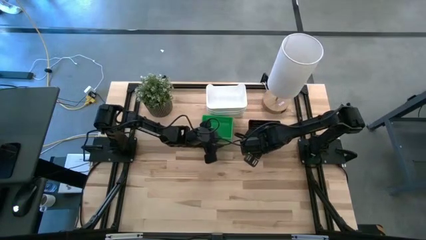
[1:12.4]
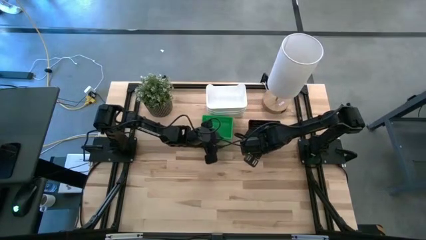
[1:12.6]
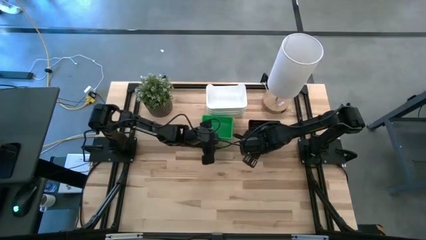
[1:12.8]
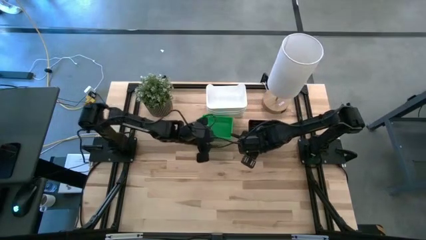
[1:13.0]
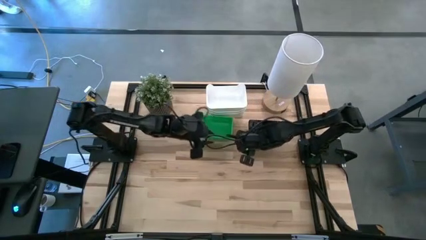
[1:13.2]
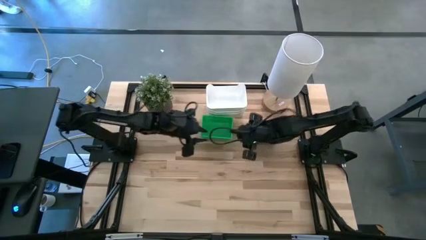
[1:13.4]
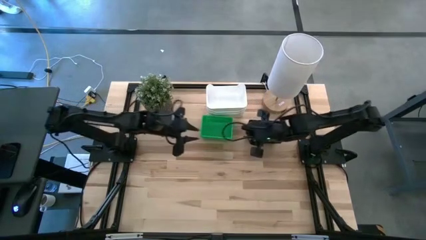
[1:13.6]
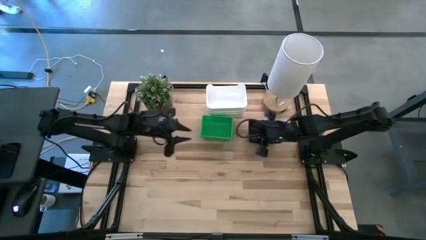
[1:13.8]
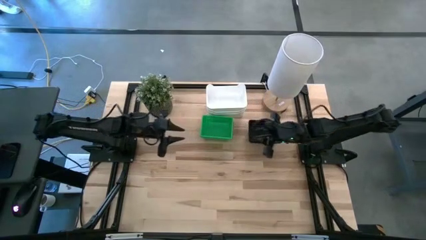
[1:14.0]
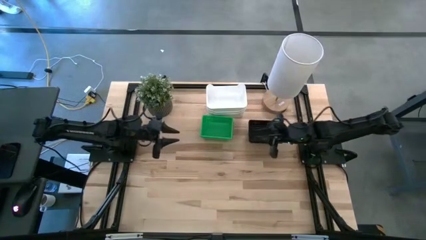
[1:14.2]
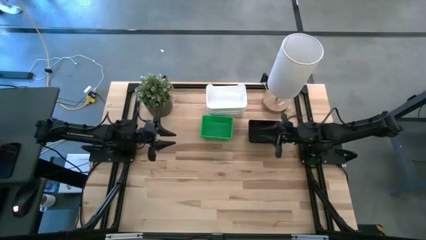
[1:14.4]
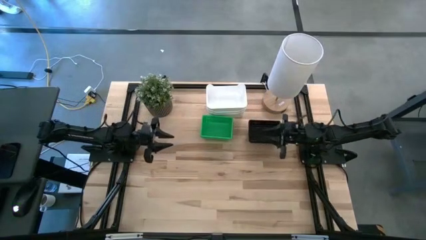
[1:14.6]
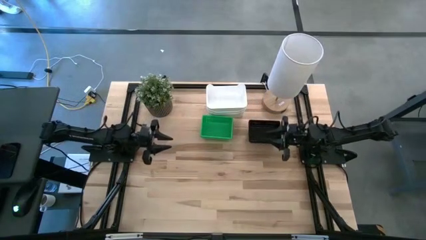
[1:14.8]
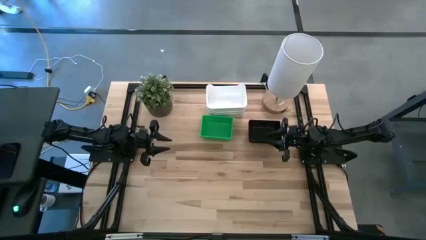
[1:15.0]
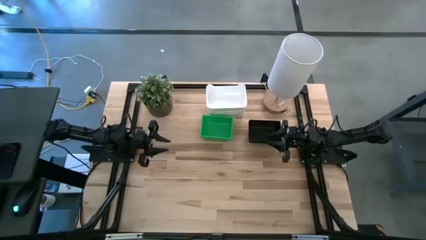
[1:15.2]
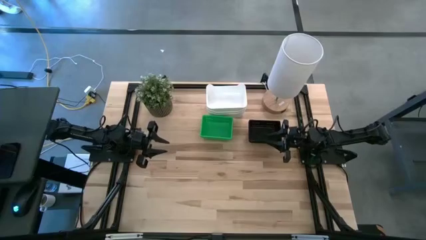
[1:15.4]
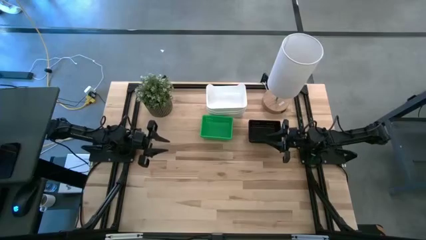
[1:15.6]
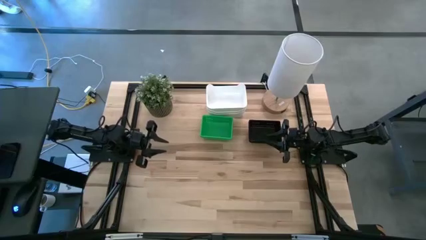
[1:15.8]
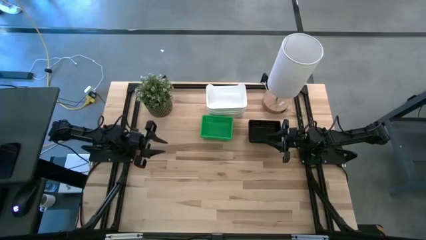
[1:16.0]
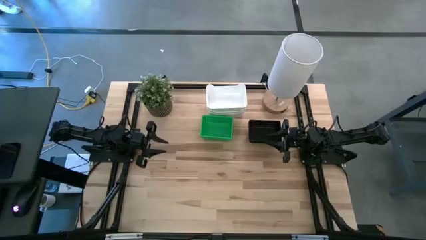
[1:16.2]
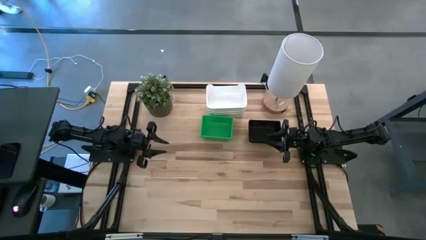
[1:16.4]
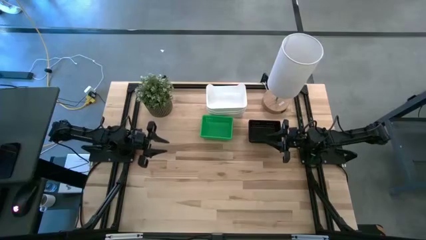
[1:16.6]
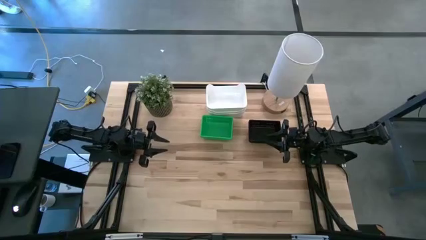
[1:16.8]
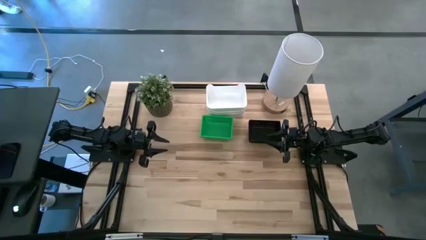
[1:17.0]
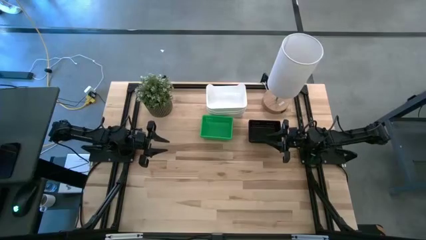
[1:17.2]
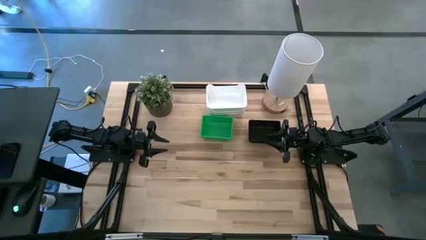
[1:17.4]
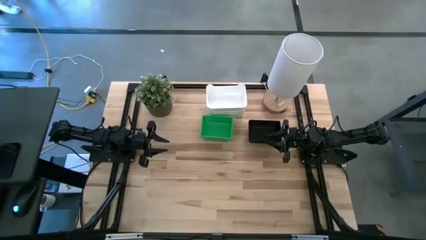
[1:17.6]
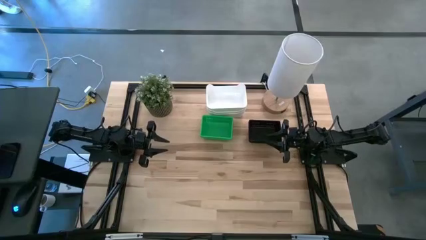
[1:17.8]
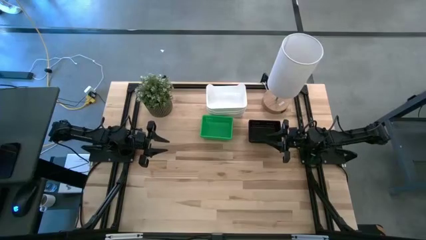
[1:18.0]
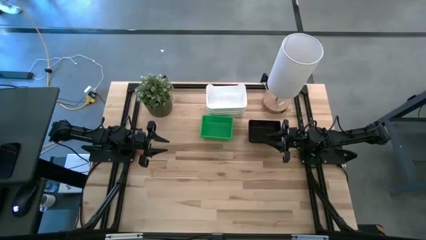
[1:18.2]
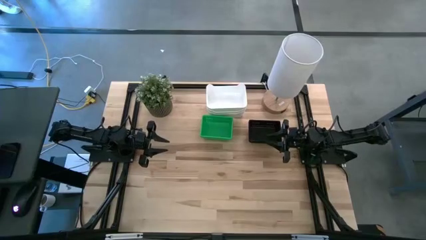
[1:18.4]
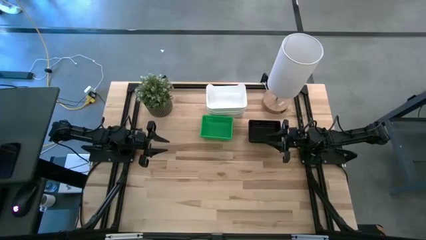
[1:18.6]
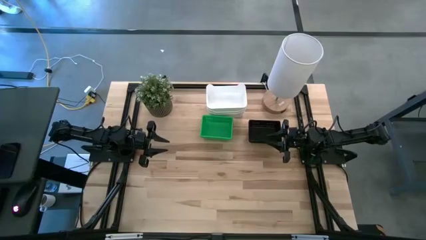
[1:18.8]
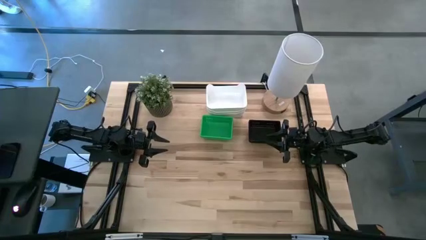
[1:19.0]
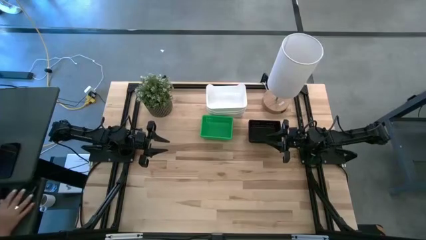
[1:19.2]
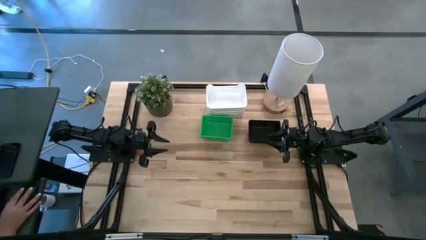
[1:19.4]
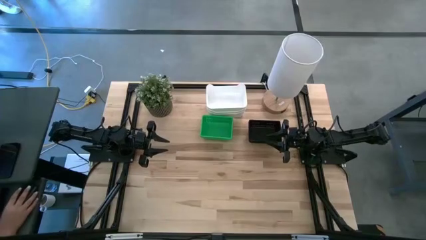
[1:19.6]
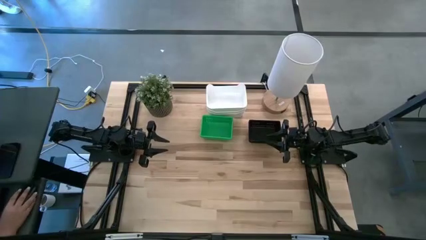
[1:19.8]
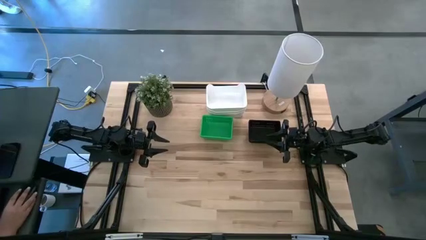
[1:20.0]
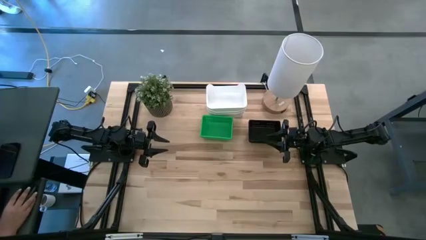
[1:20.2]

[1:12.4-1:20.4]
Return to Home Position
